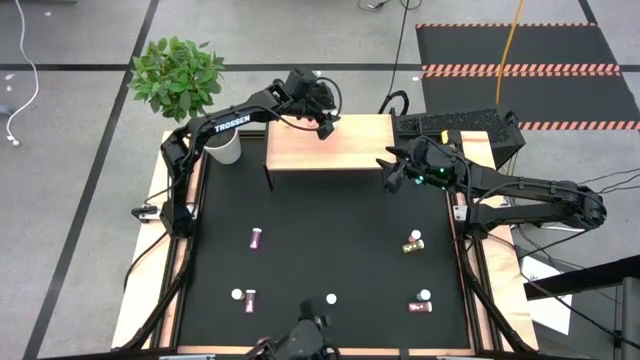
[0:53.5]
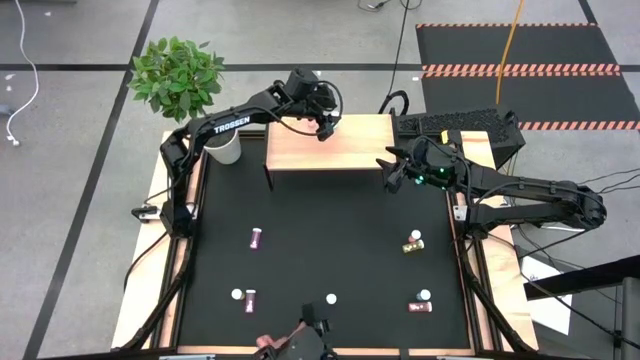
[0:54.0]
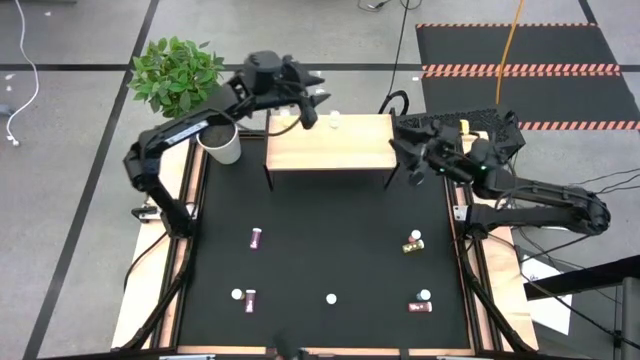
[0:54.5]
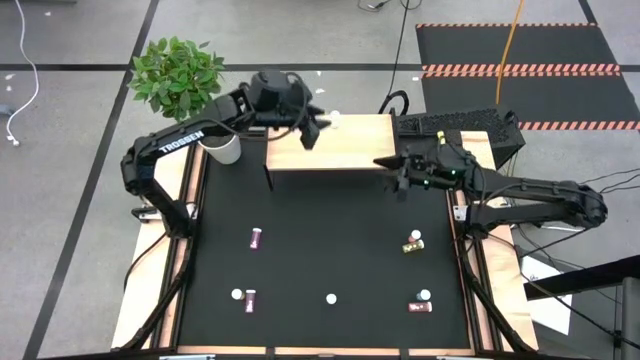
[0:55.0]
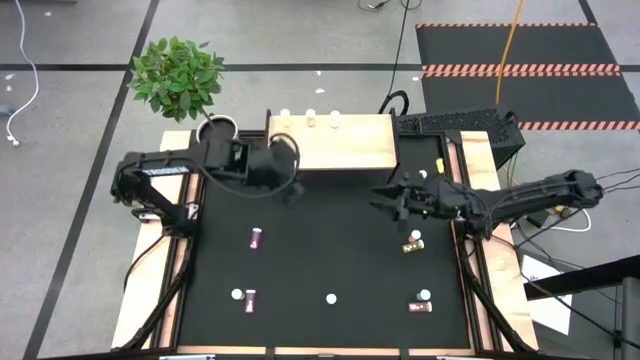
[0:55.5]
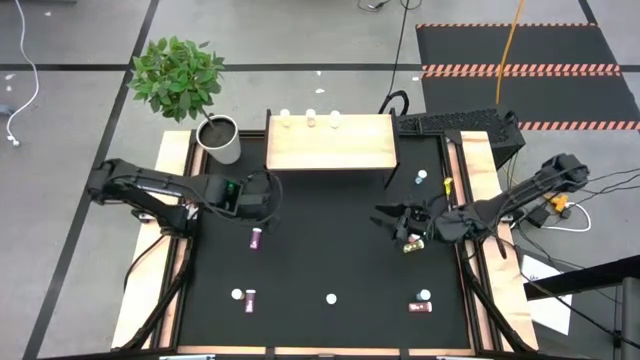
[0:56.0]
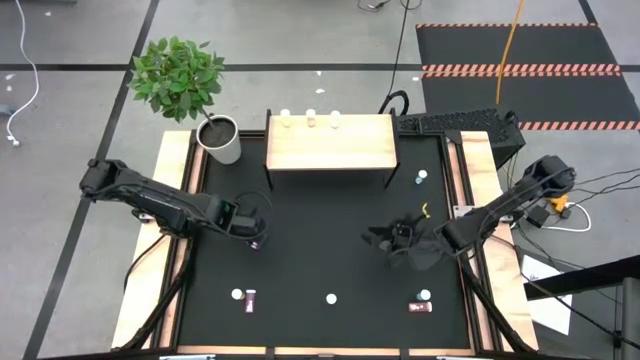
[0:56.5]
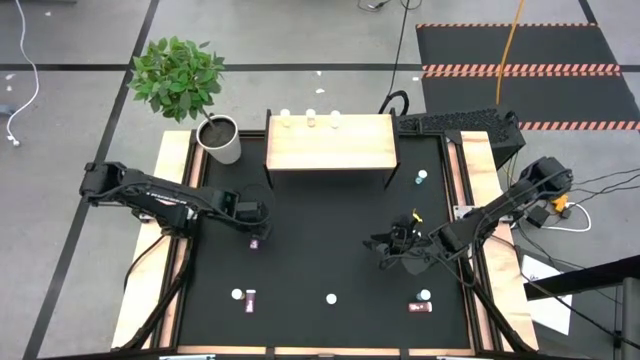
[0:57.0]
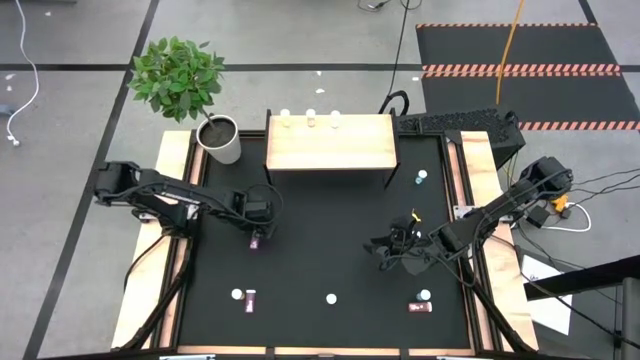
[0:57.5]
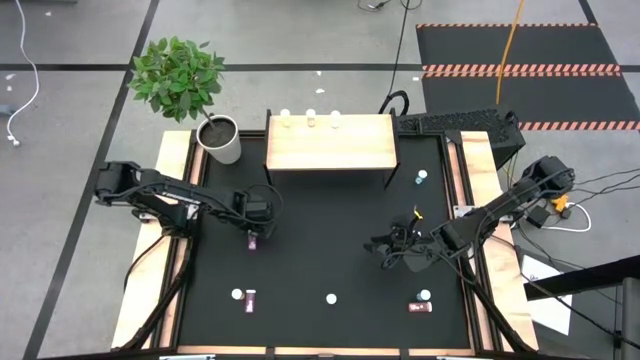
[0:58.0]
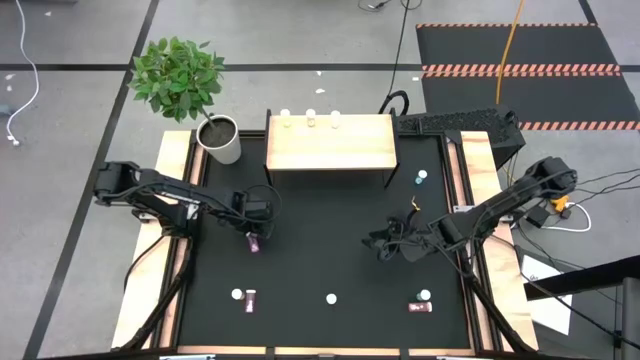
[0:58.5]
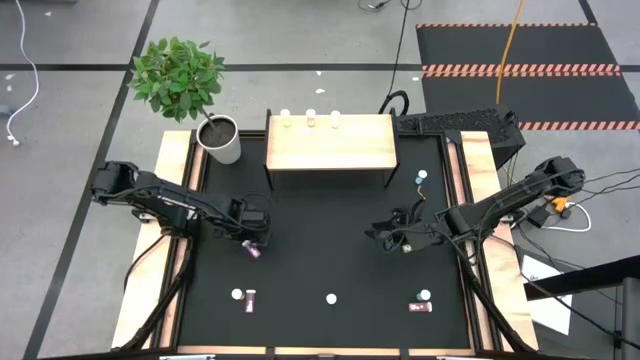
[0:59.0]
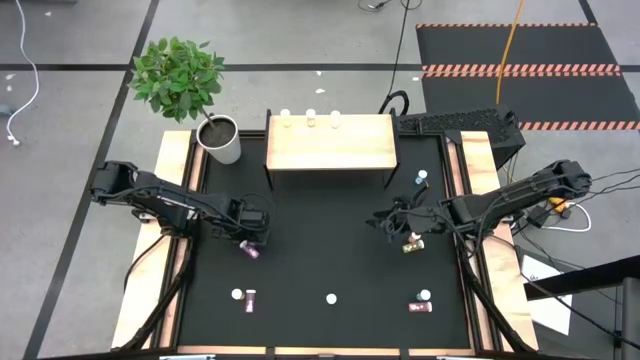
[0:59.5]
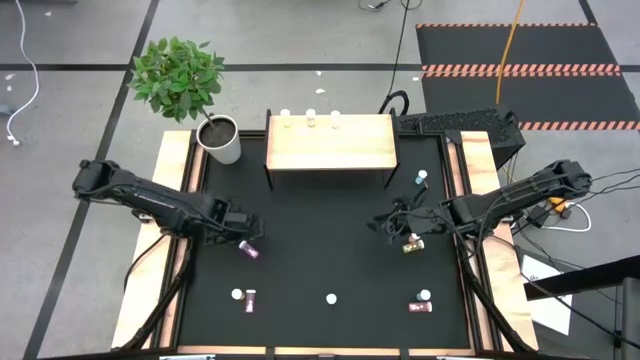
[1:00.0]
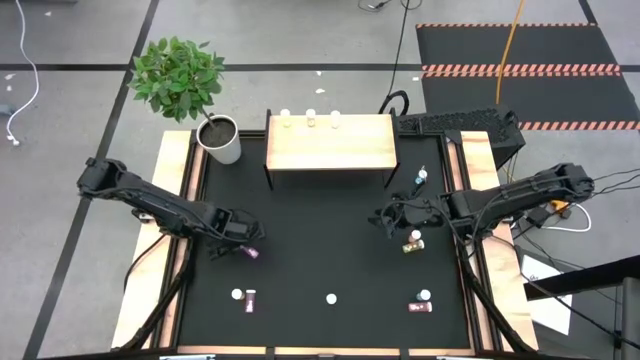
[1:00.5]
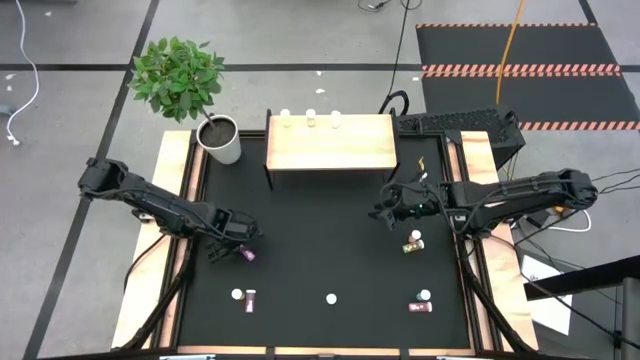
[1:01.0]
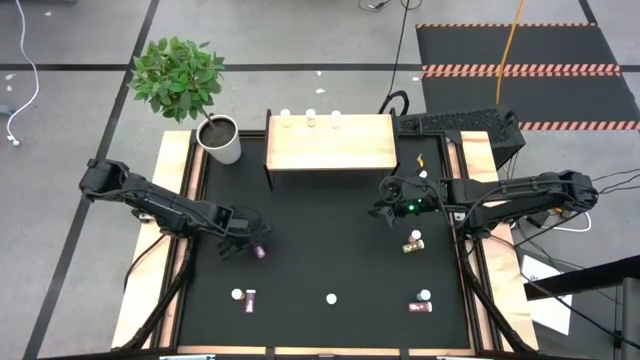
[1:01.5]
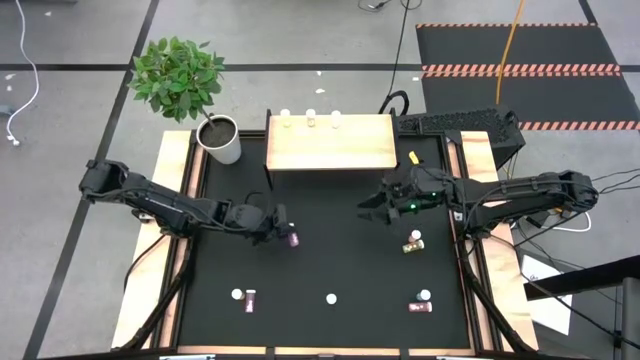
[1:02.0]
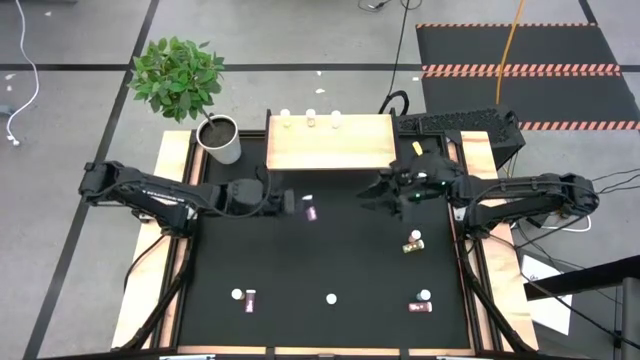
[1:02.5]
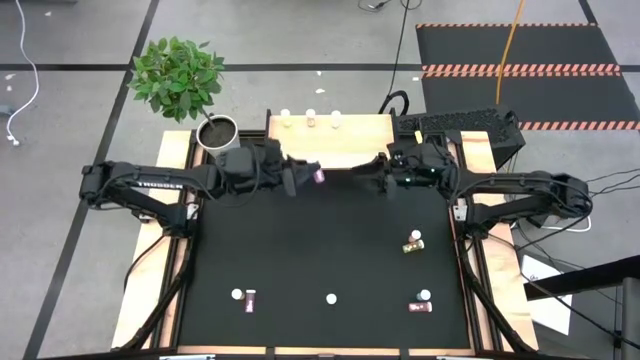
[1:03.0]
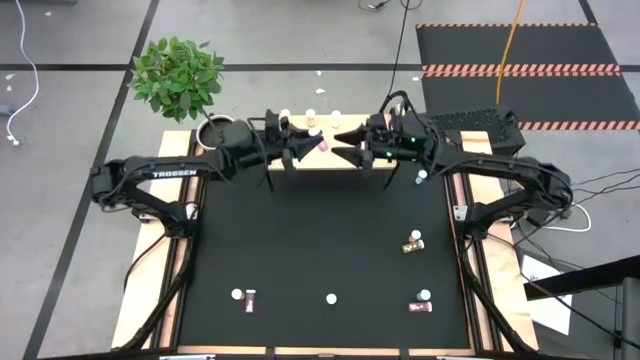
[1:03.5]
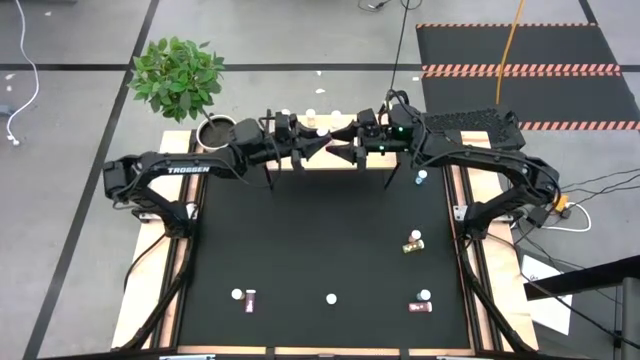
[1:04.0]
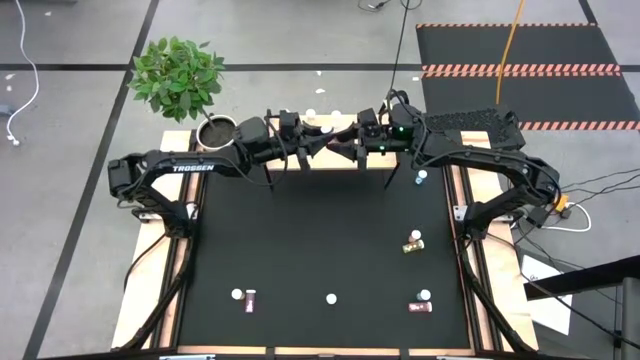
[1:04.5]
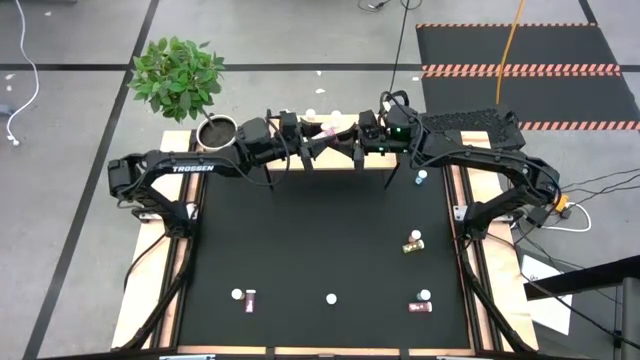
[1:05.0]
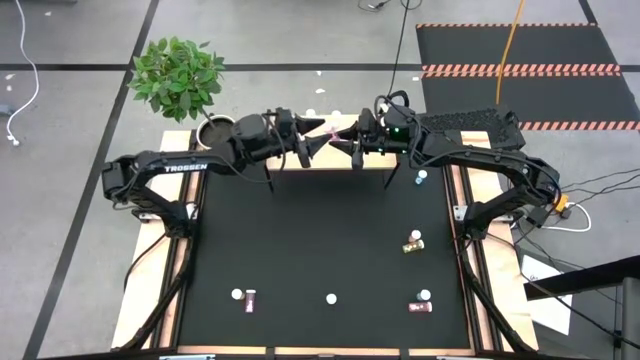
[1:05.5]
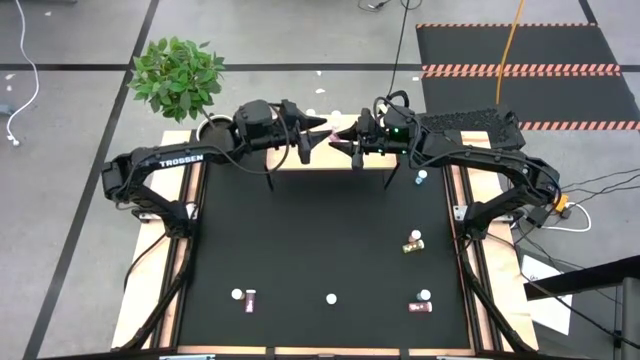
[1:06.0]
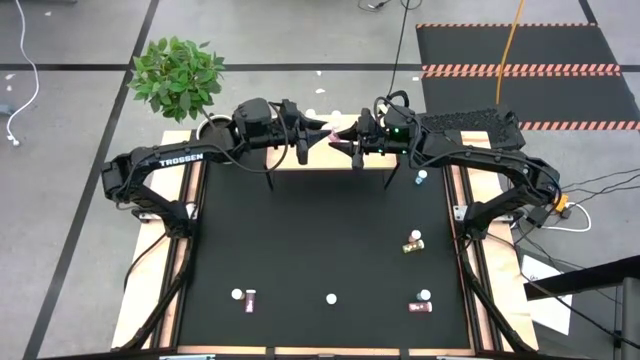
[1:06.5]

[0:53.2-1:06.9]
Task: Pick and place medicine bottles onto shelf by color
Put the top pink pill bottle on the shelf

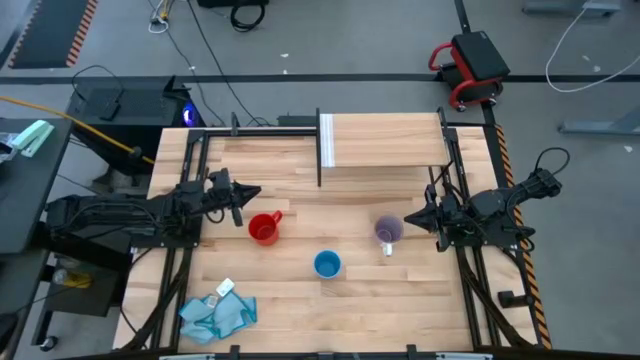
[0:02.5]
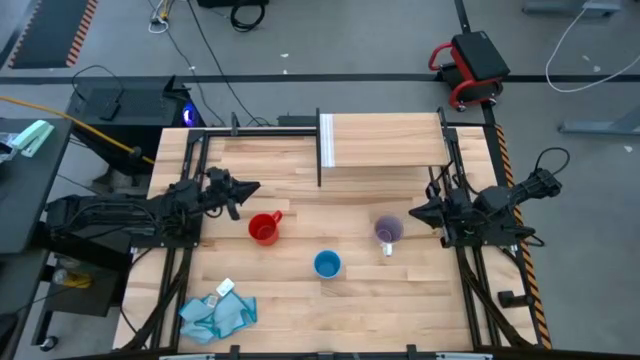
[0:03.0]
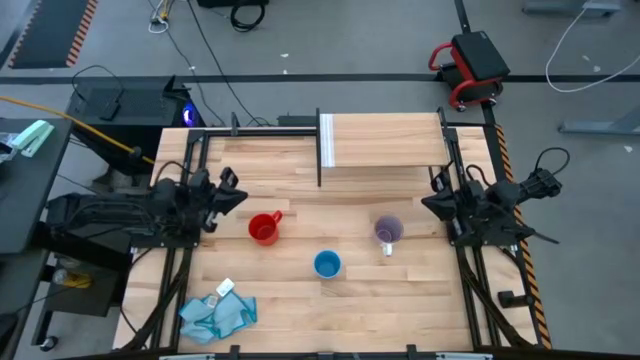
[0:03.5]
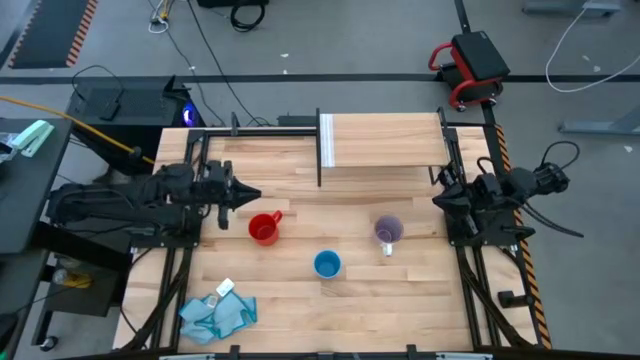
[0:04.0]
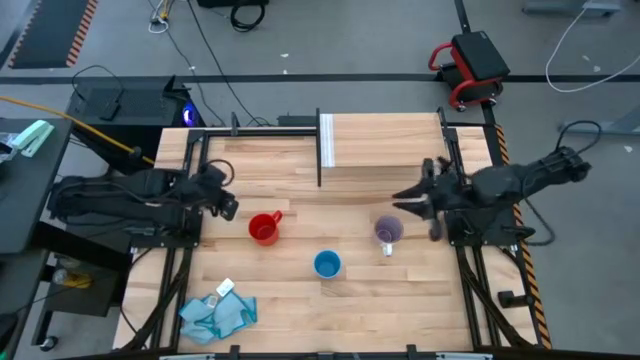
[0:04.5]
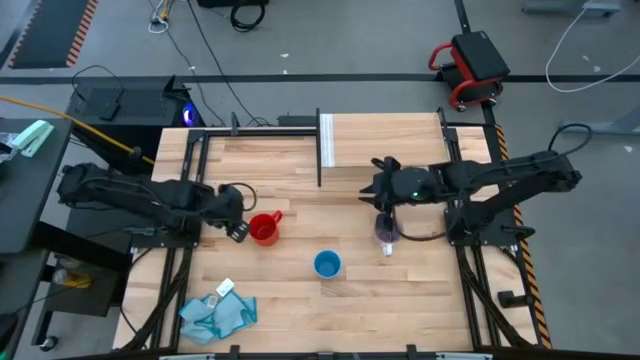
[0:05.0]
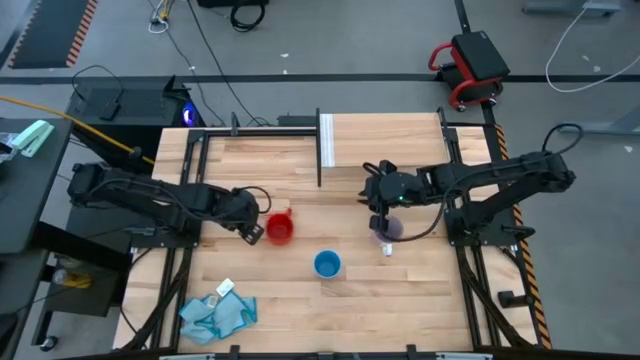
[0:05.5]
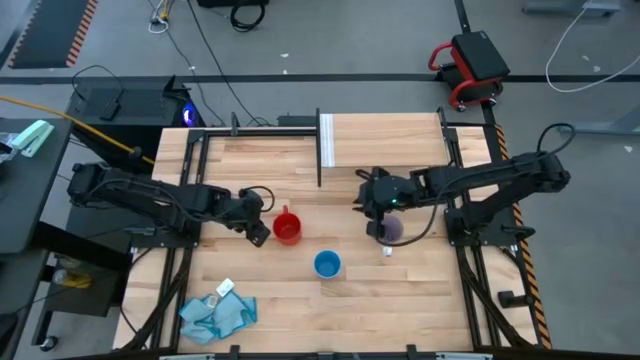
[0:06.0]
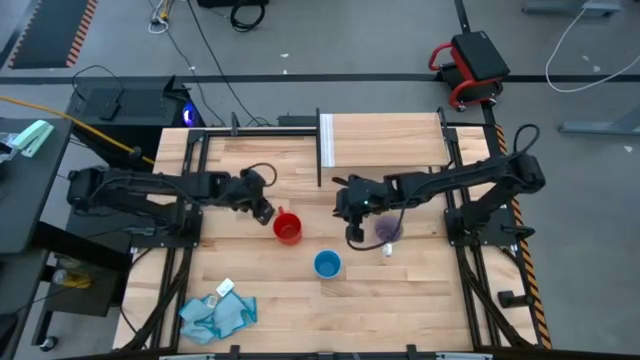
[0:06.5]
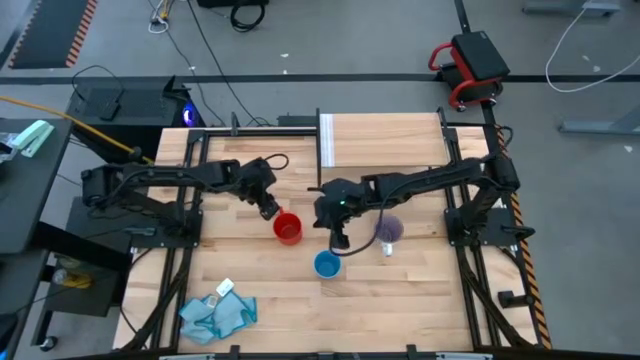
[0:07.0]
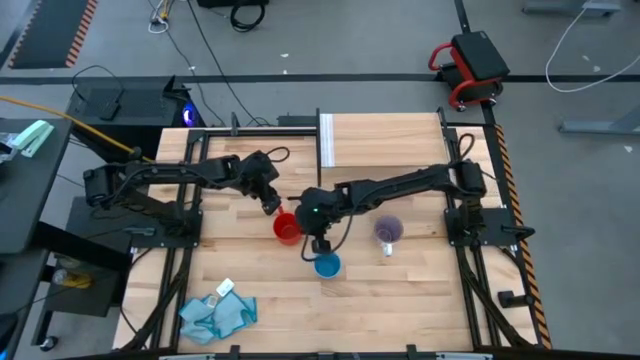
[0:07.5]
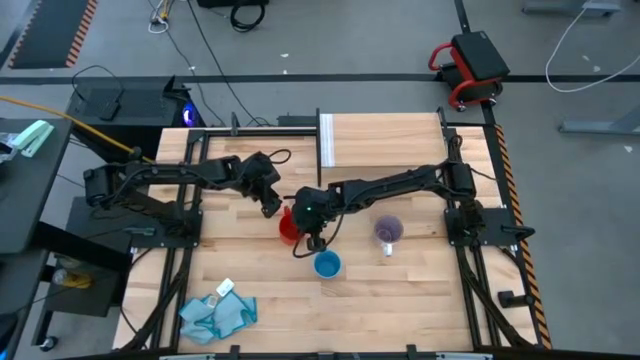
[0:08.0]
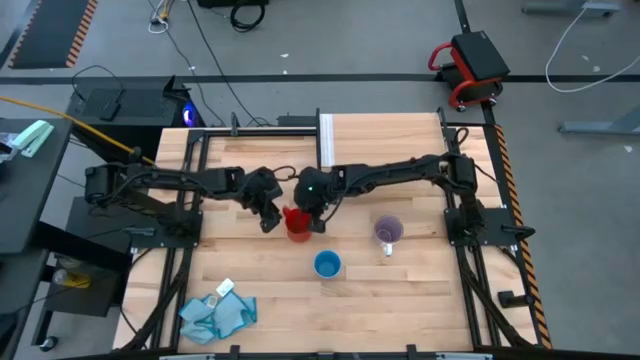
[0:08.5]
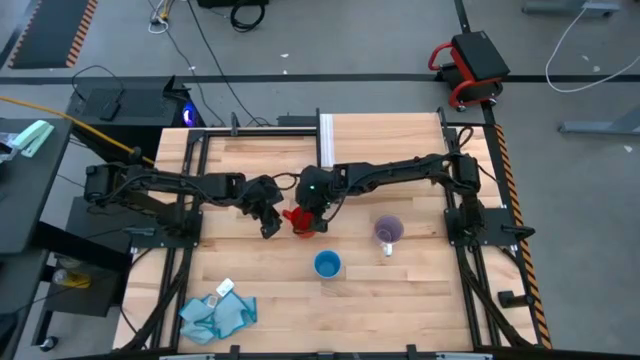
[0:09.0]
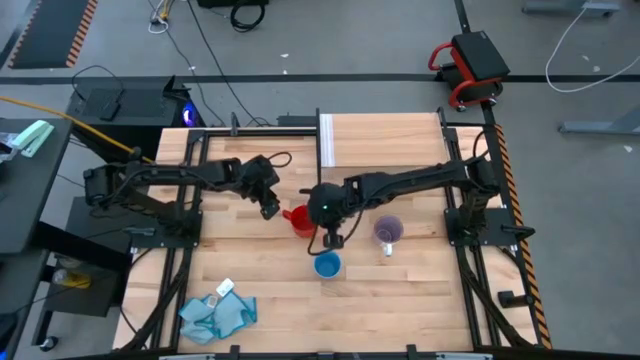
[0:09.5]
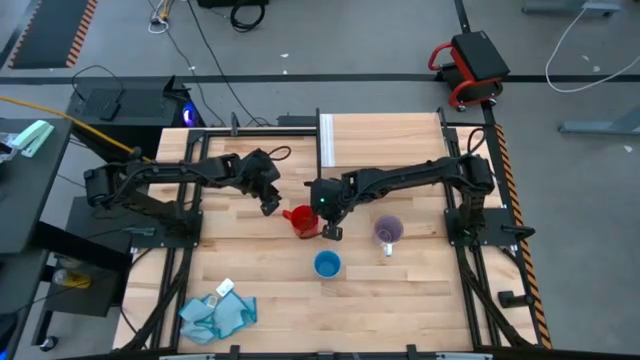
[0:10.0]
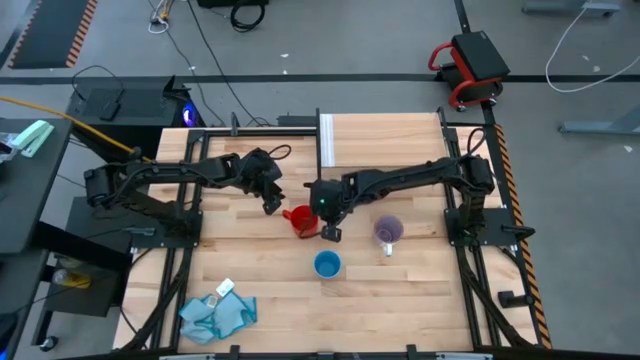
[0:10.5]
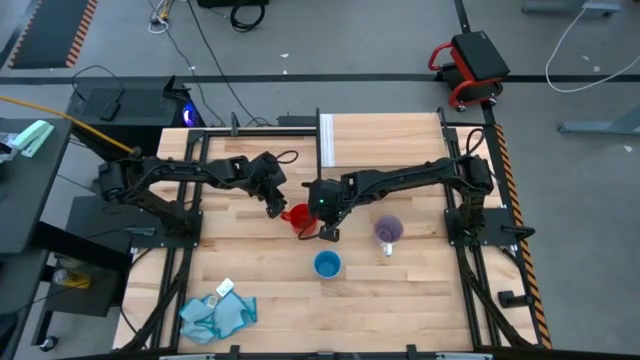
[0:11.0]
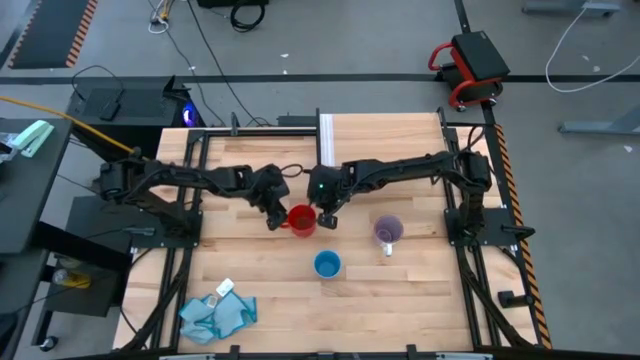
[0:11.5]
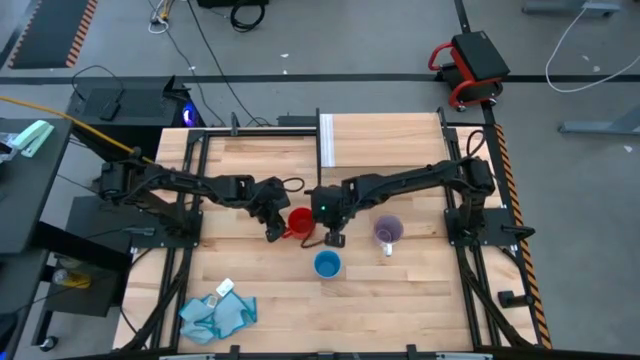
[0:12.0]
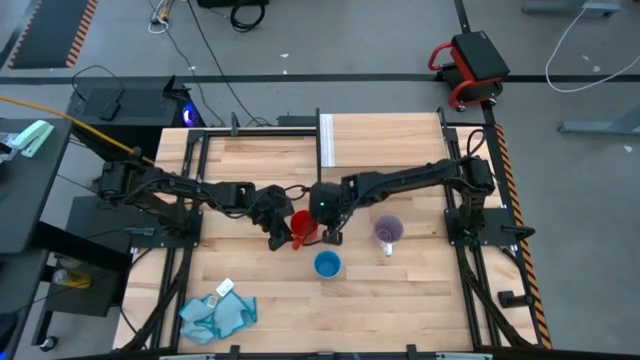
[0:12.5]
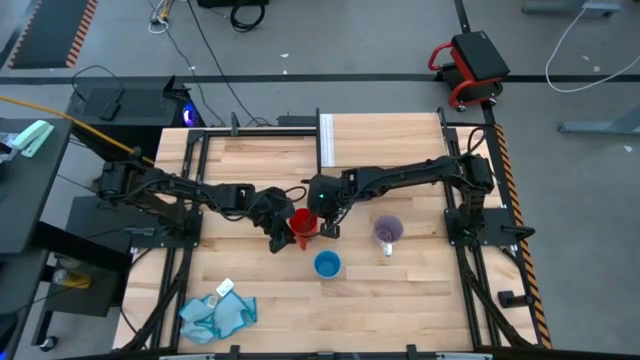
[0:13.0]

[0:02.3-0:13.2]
Task: Stack small to large cups/mugs on shelf
Put the red mug on the shelf
